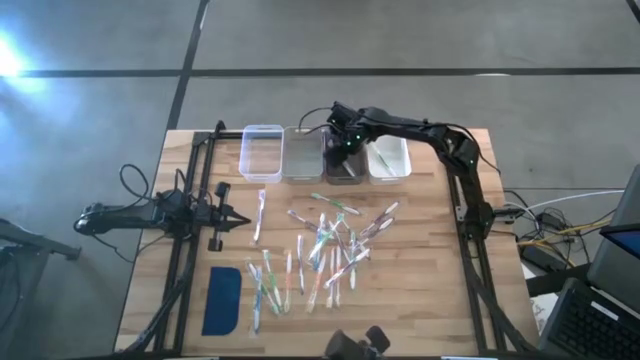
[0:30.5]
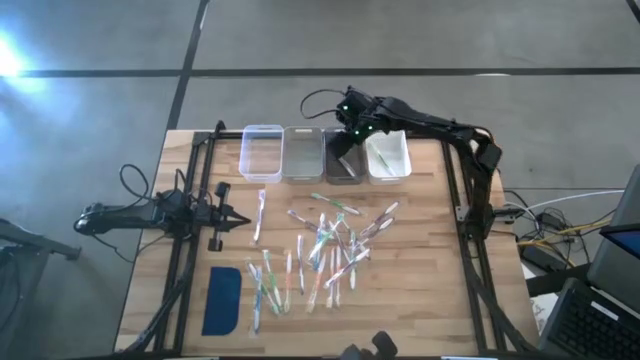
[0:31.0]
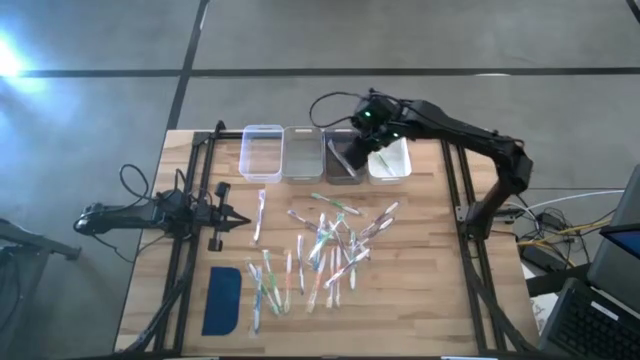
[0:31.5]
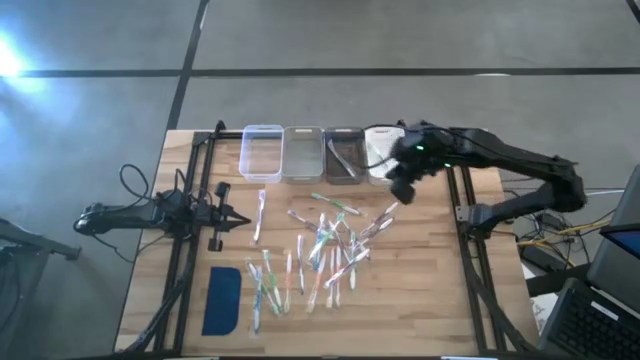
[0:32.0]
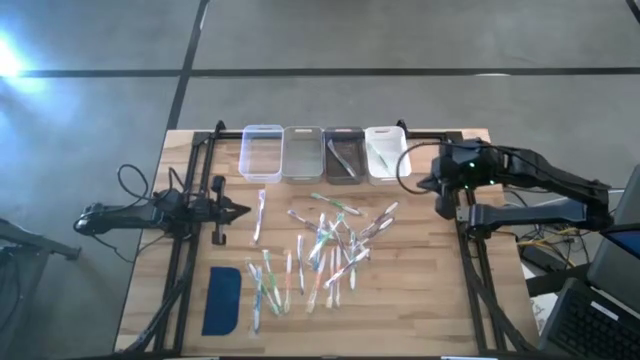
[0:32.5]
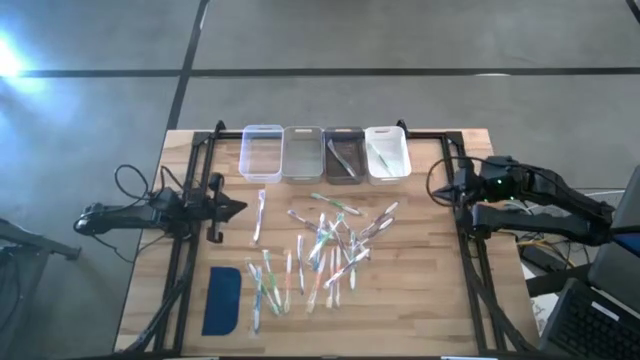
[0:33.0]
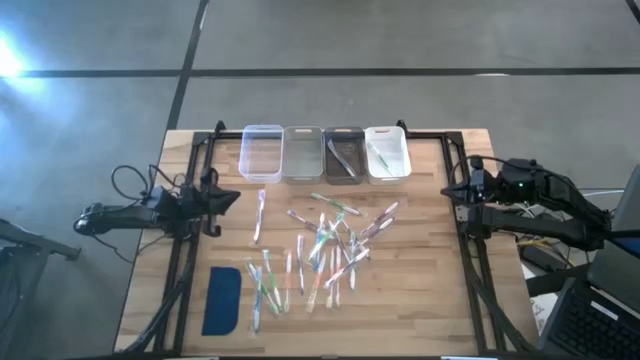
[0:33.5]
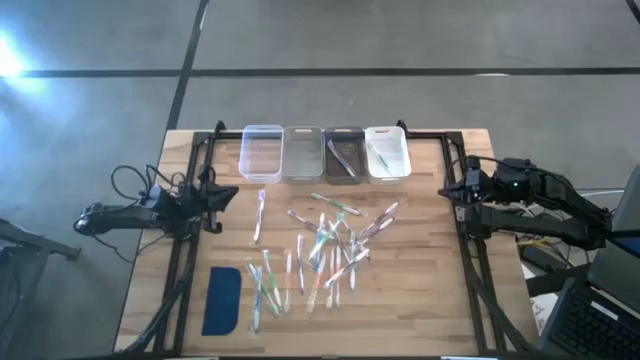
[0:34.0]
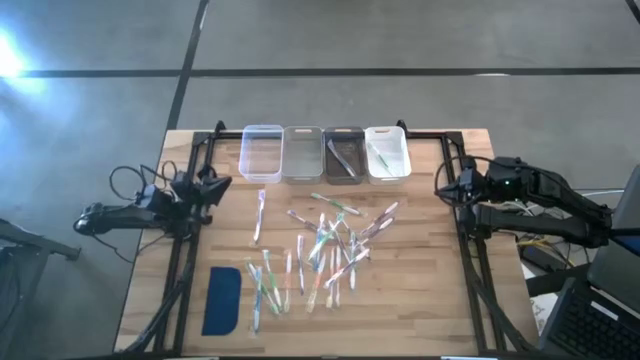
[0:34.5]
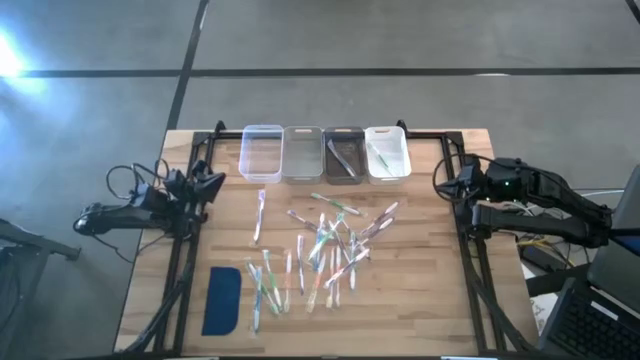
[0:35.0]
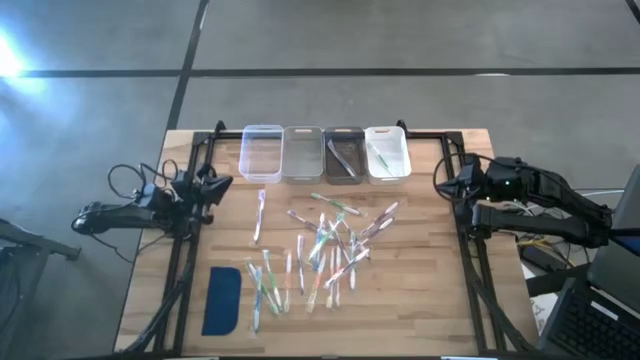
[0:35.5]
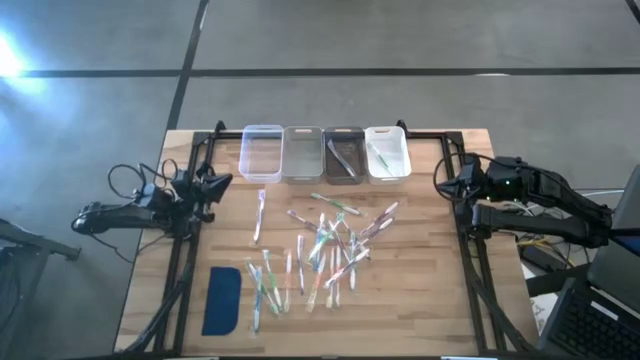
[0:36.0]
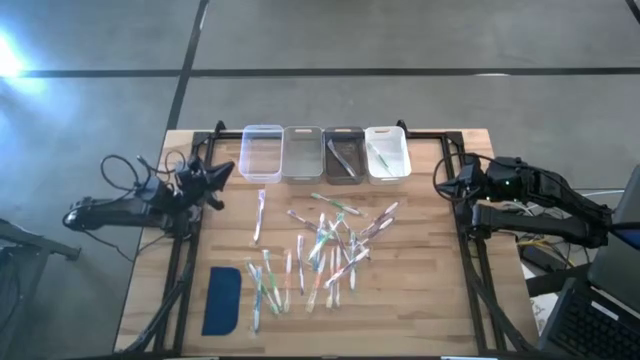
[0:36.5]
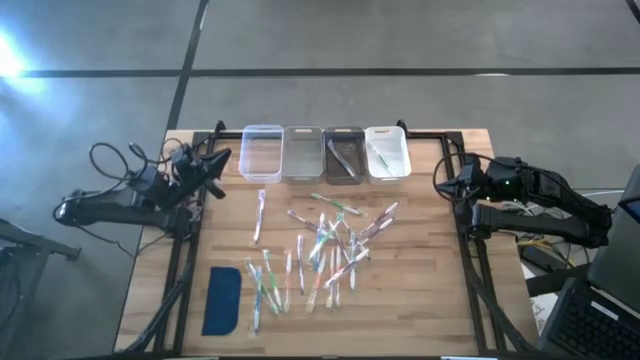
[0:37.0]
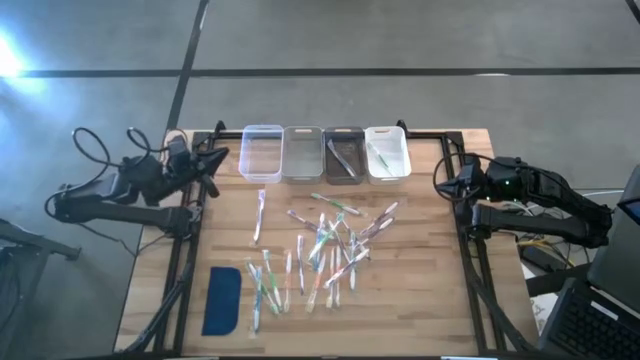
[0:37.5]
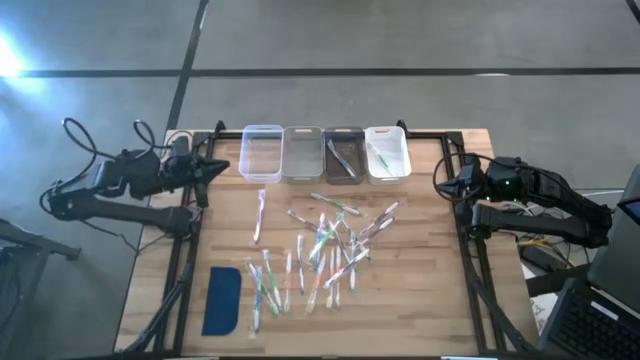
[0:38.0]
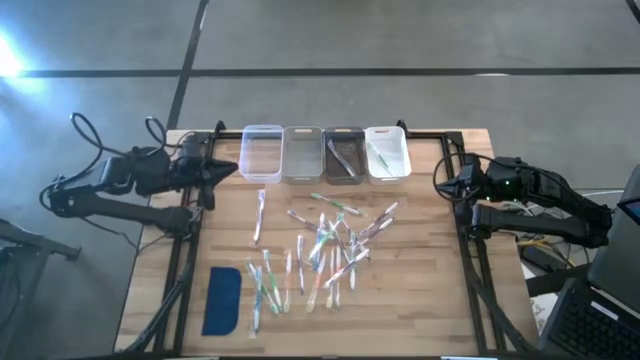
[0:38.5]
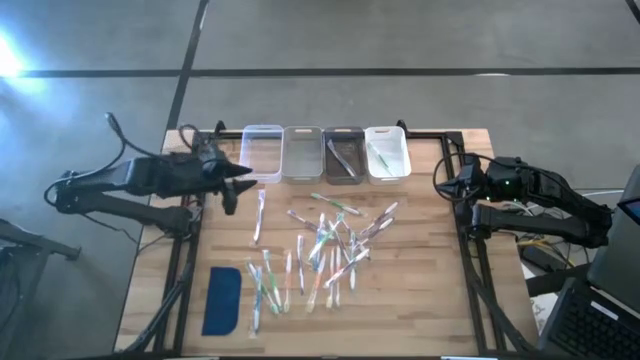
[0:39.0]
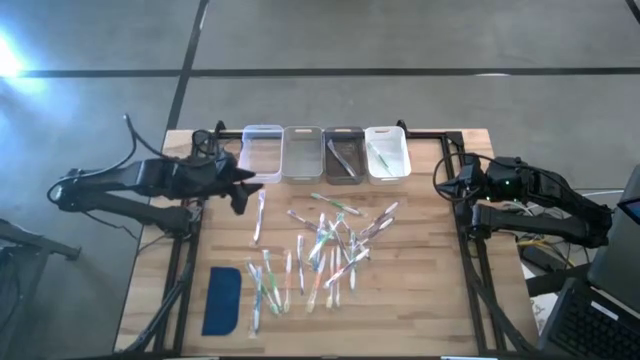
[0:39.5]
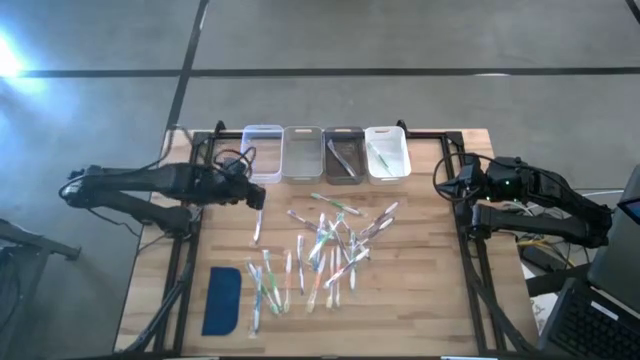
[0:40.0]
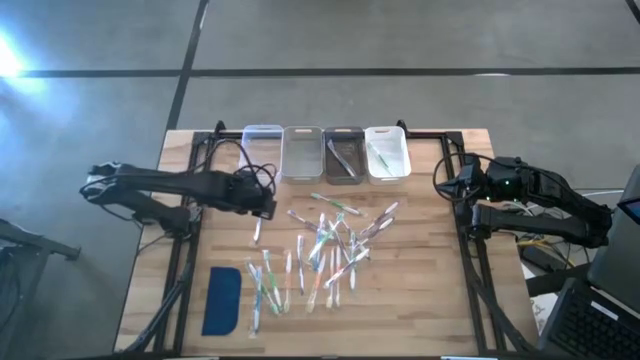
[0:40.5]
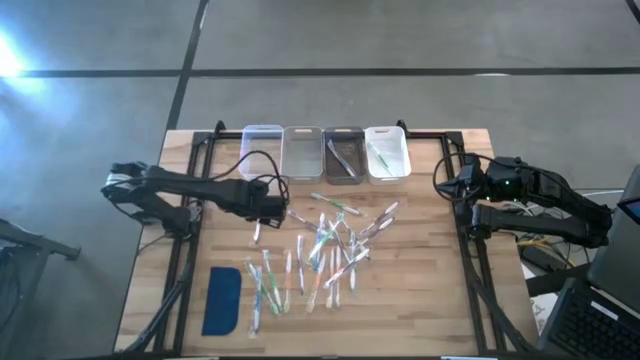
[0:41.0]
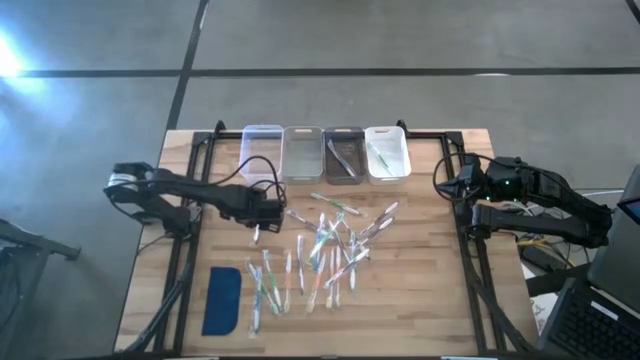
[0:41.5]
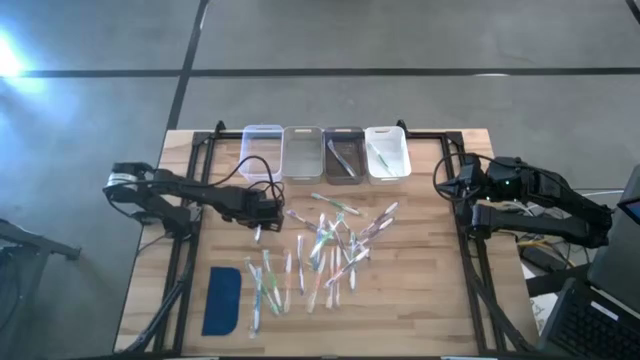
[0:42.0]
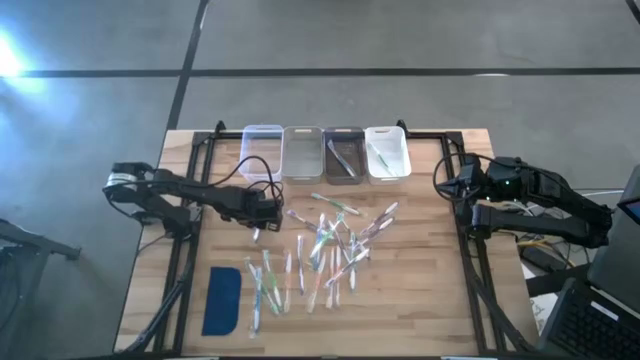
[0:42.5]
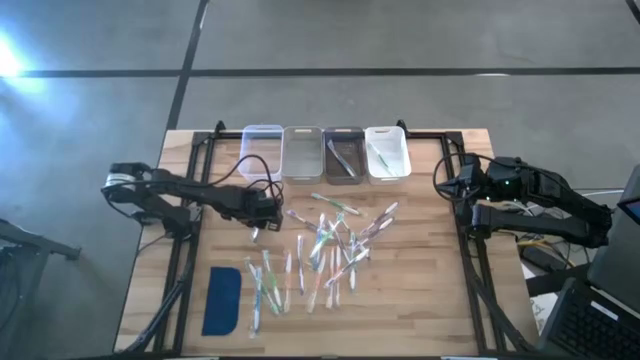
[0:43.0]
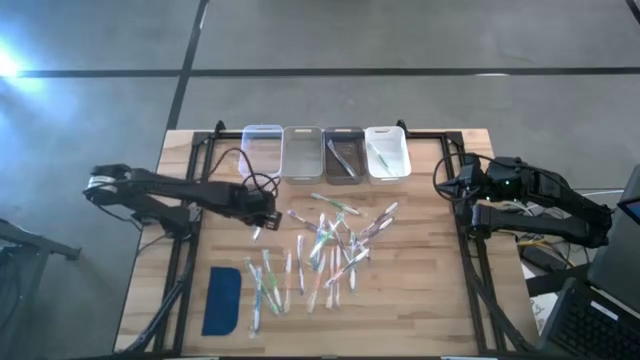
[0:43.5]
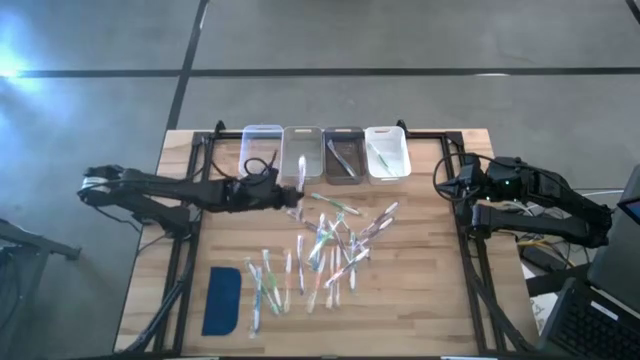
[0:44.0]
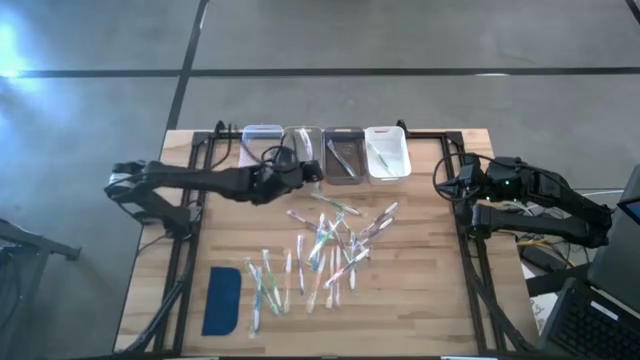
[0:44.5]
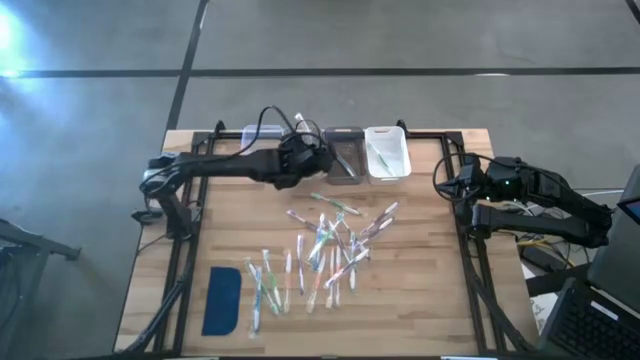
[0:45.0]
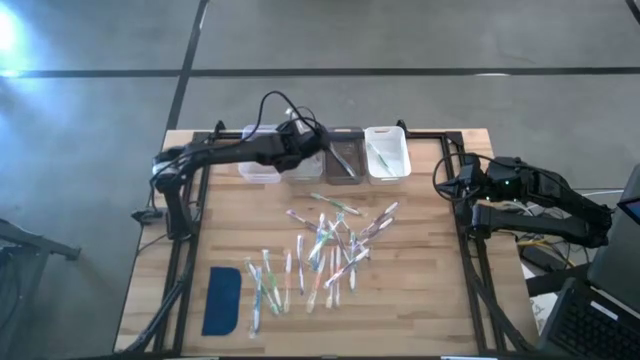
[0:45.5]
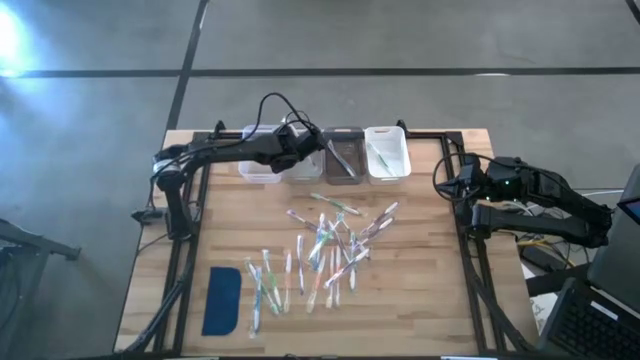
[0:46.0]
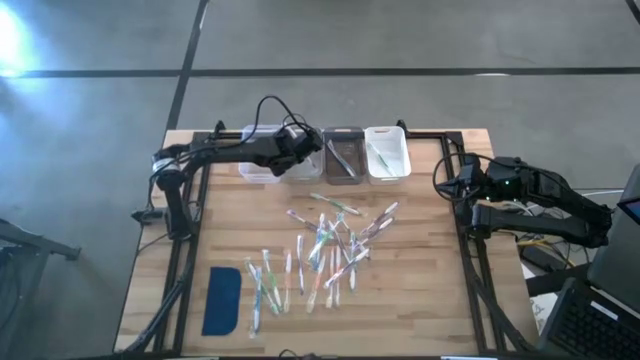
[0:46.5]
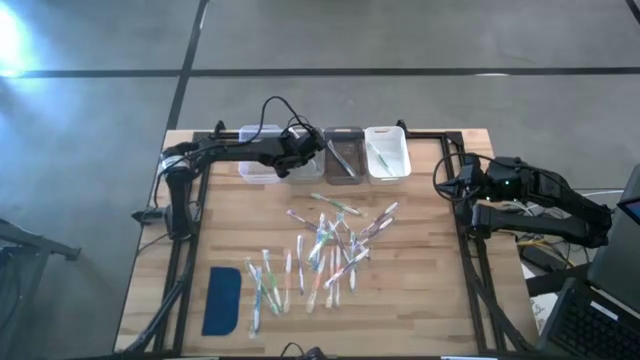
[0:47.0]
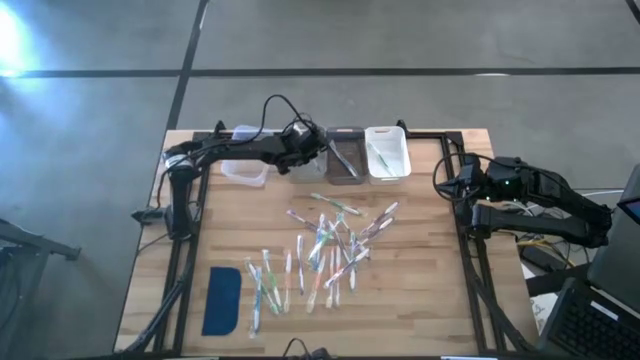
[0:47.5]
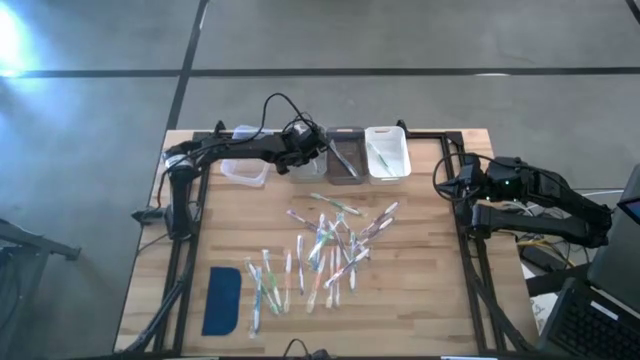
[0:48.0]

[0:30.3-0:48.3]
Task: Pick & Place Toothbrushes
Put the purple toothbrush into the gray bin

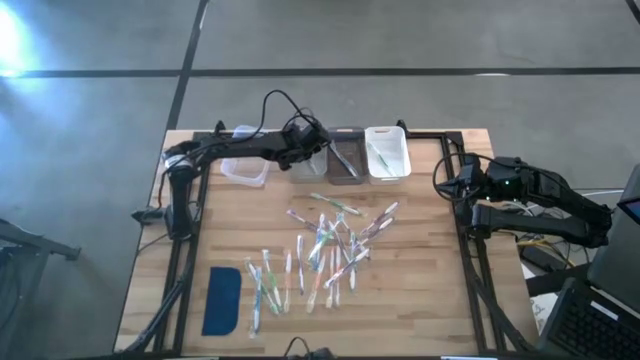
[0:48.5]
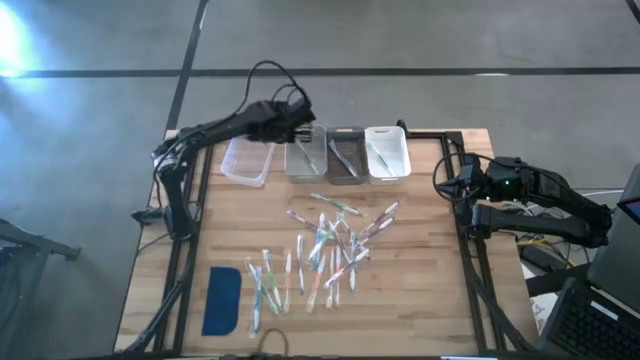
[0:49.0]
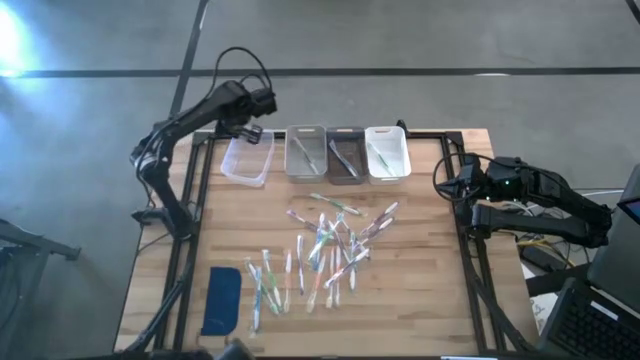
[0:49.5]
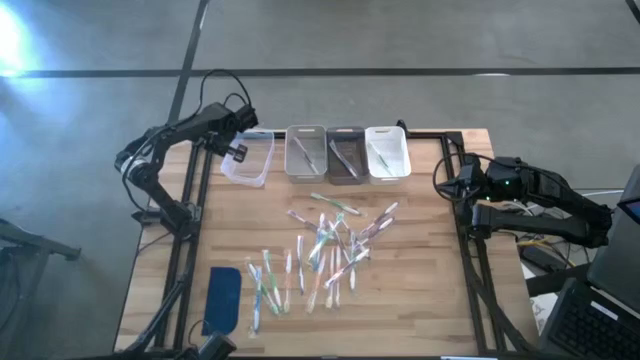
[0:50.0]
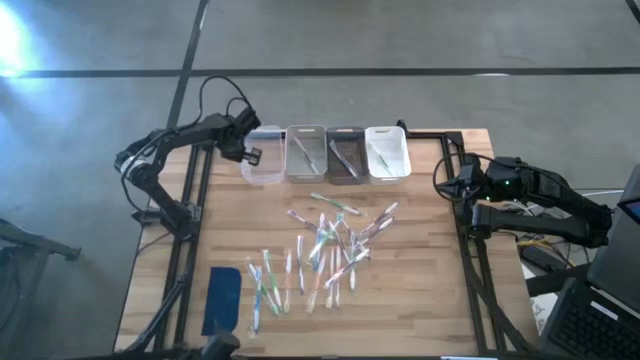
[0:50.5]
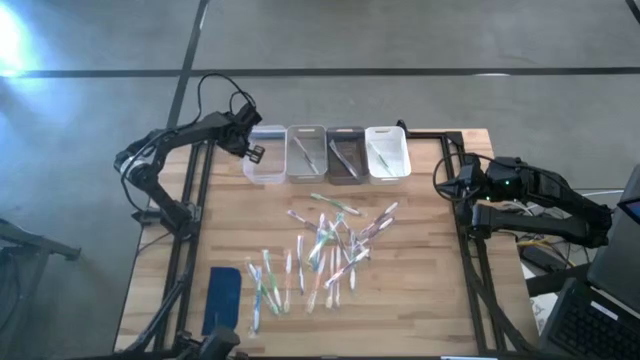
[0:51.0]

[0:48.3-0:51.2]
Adjust the white transparent bin
